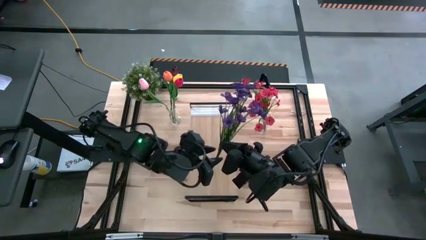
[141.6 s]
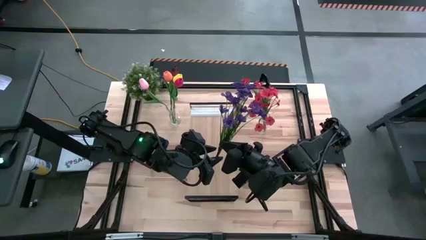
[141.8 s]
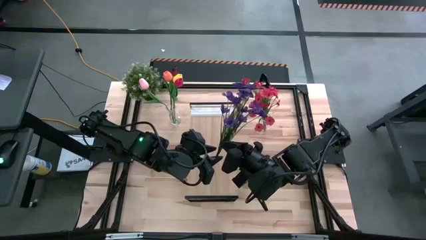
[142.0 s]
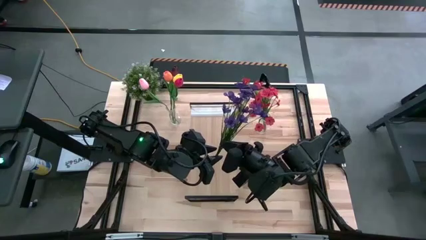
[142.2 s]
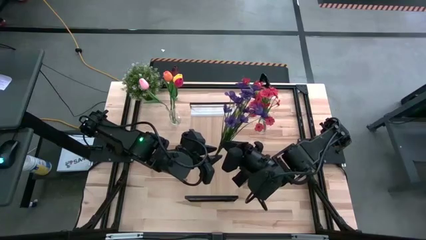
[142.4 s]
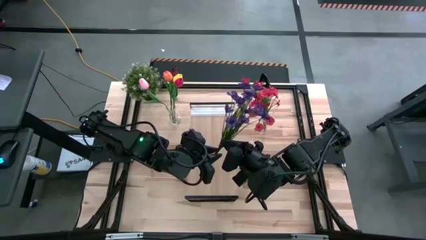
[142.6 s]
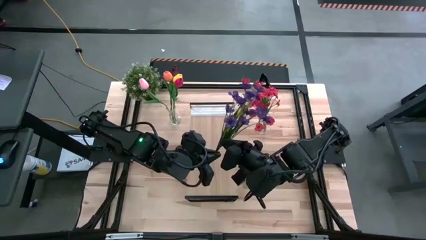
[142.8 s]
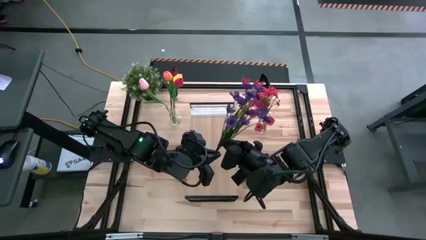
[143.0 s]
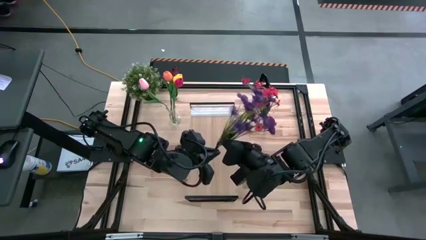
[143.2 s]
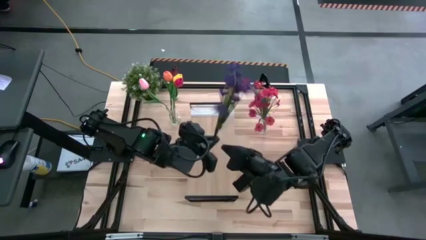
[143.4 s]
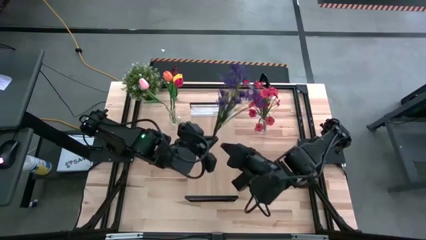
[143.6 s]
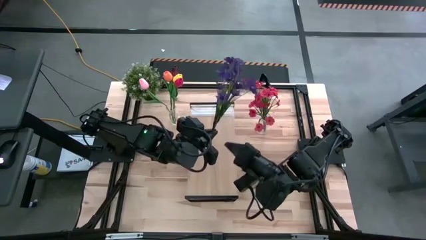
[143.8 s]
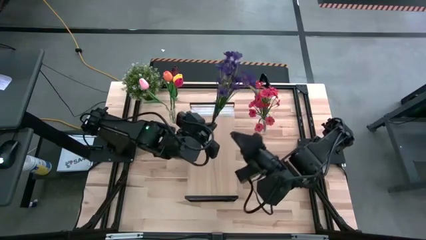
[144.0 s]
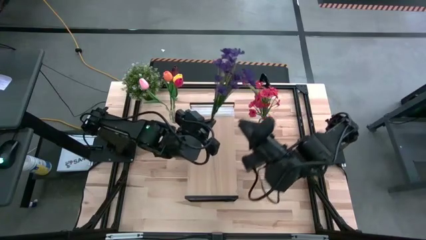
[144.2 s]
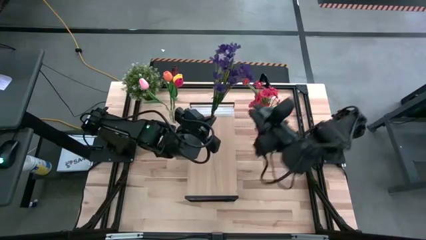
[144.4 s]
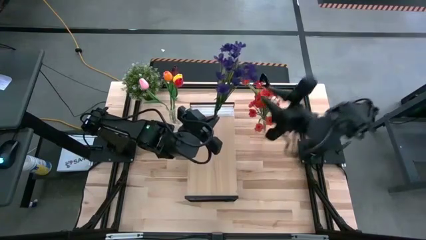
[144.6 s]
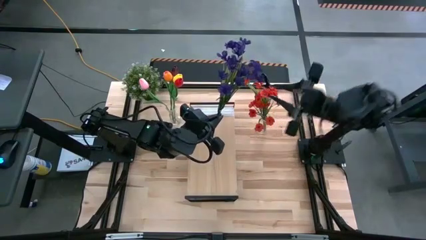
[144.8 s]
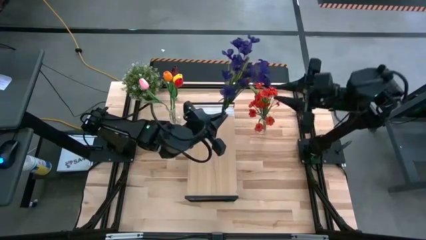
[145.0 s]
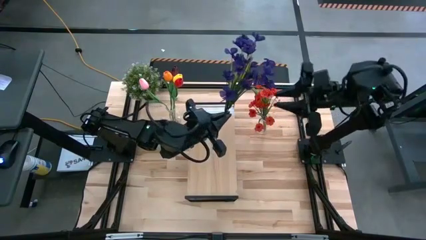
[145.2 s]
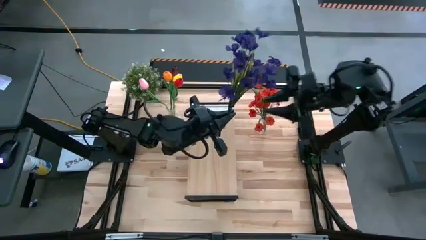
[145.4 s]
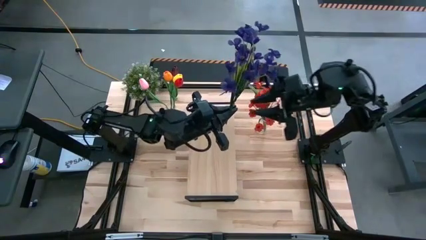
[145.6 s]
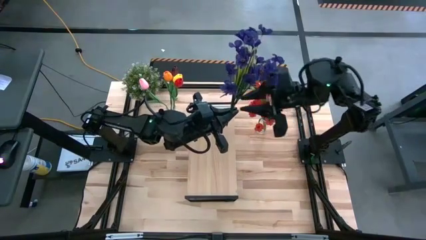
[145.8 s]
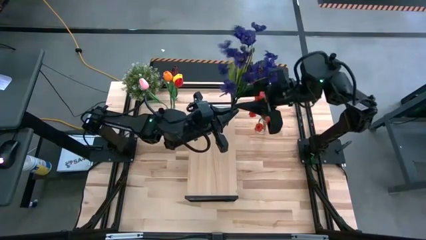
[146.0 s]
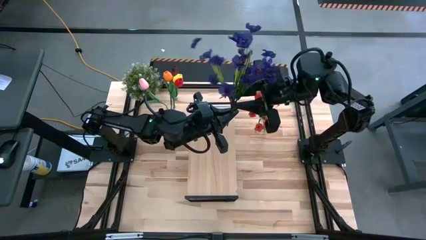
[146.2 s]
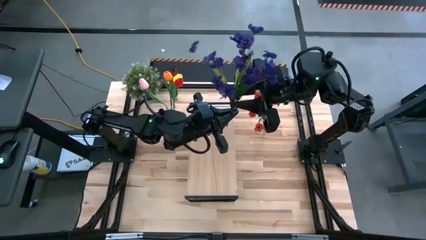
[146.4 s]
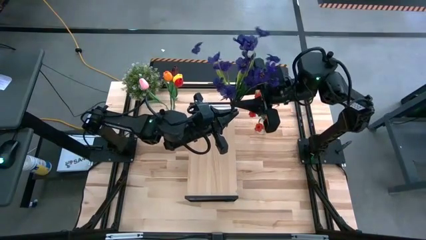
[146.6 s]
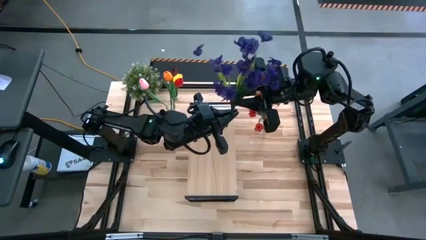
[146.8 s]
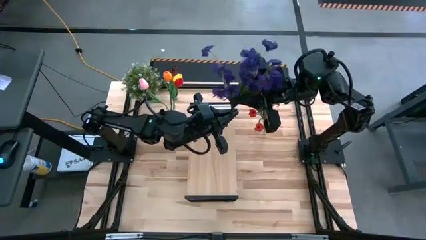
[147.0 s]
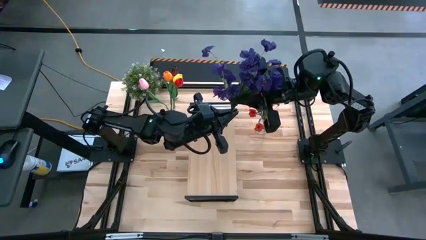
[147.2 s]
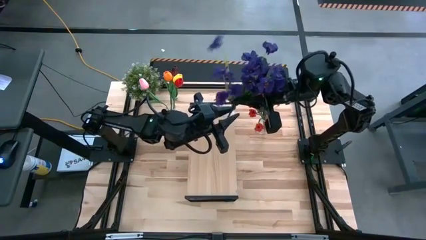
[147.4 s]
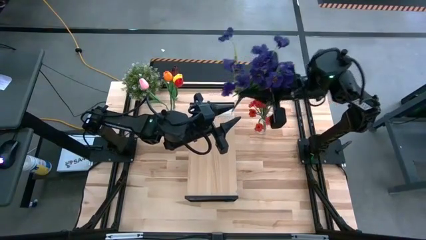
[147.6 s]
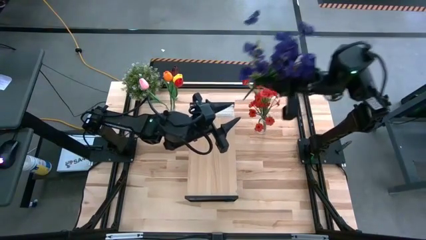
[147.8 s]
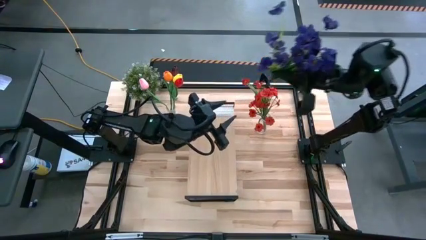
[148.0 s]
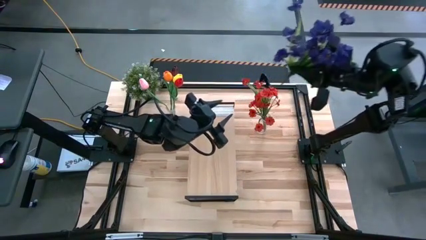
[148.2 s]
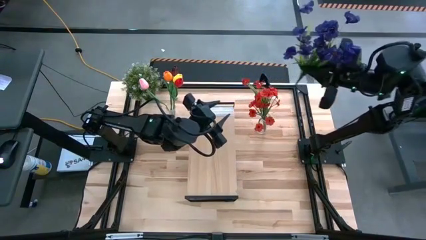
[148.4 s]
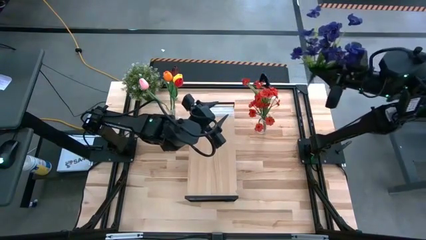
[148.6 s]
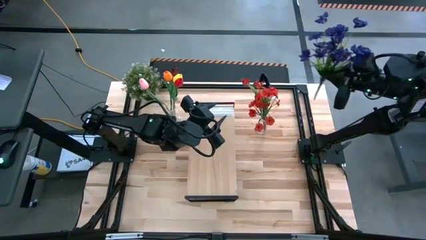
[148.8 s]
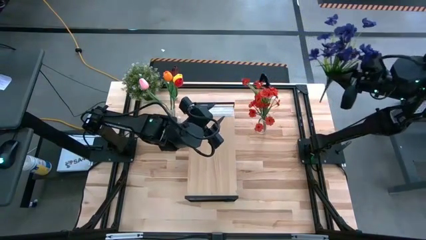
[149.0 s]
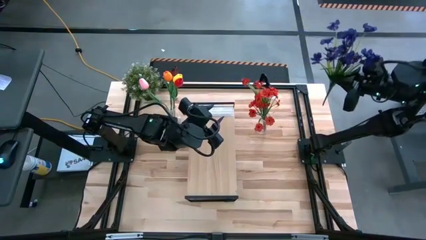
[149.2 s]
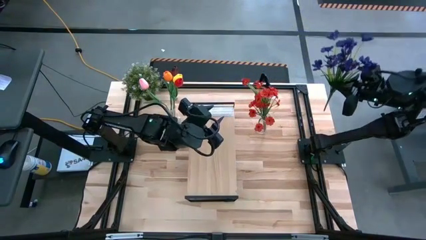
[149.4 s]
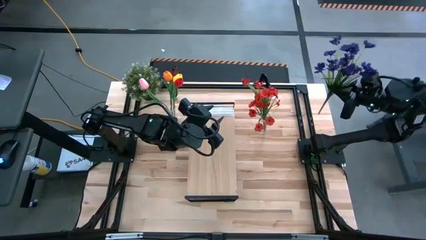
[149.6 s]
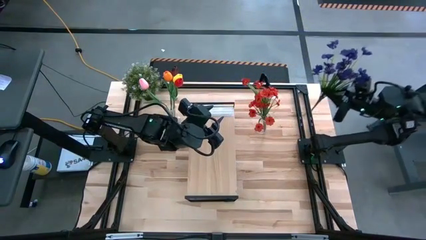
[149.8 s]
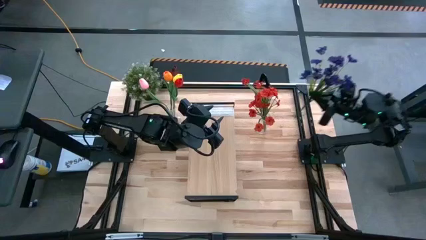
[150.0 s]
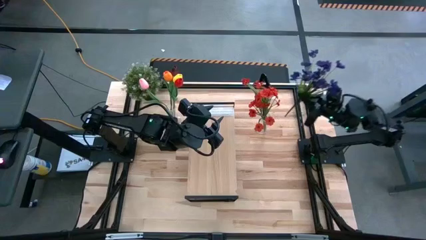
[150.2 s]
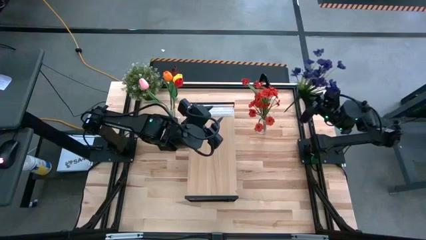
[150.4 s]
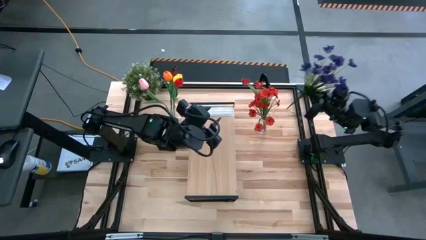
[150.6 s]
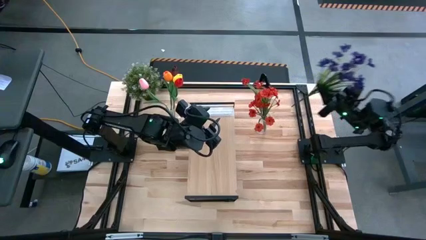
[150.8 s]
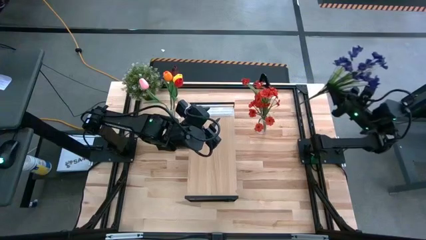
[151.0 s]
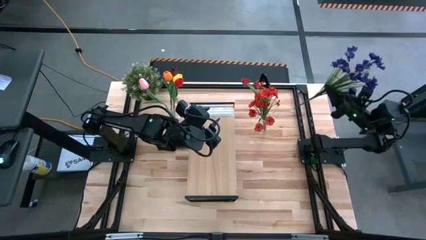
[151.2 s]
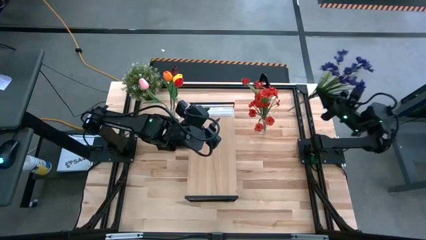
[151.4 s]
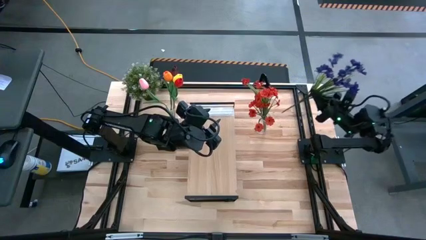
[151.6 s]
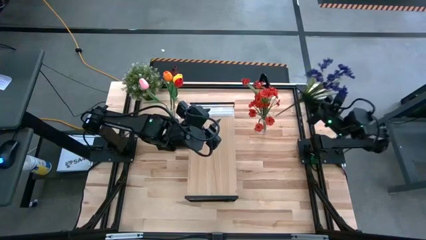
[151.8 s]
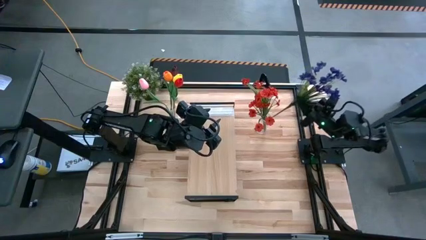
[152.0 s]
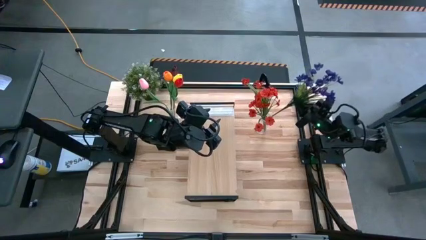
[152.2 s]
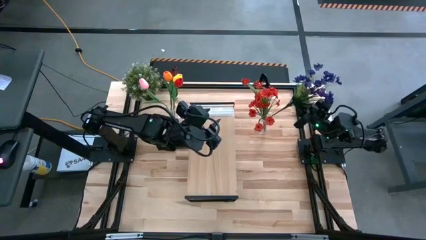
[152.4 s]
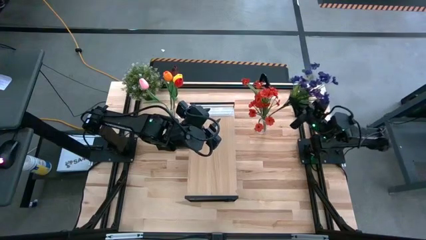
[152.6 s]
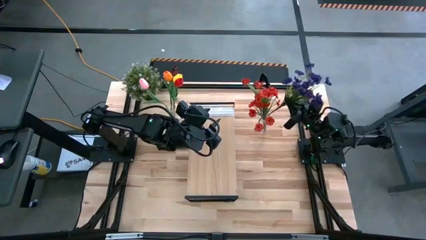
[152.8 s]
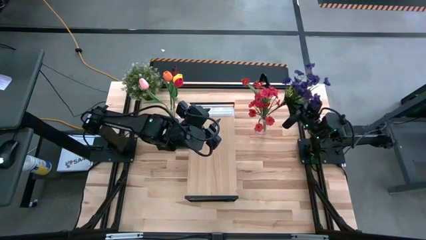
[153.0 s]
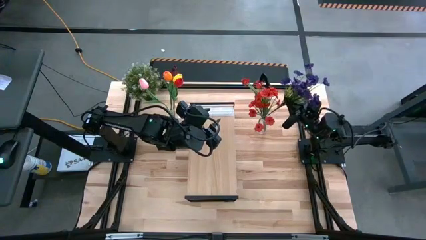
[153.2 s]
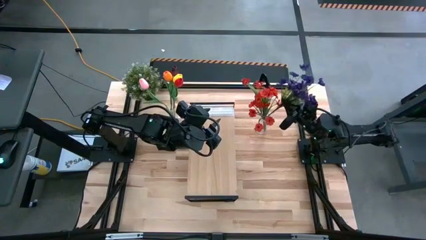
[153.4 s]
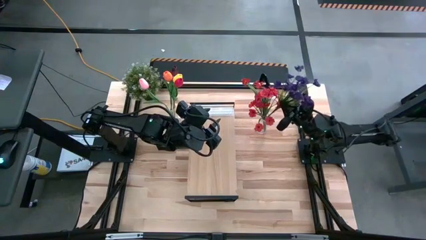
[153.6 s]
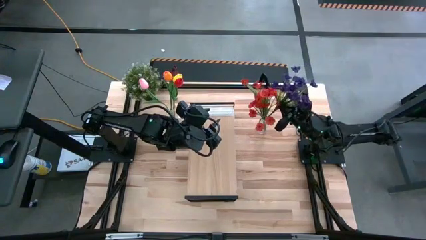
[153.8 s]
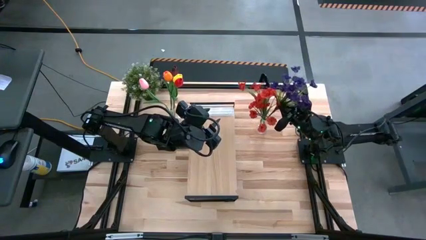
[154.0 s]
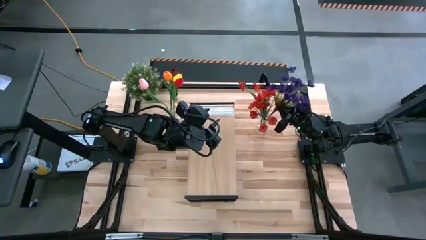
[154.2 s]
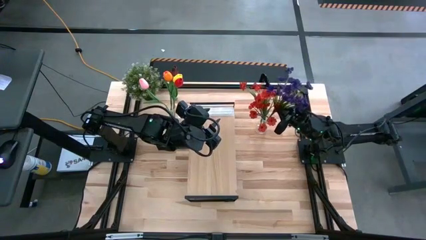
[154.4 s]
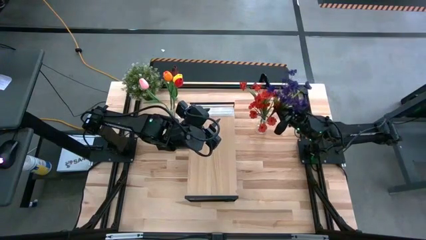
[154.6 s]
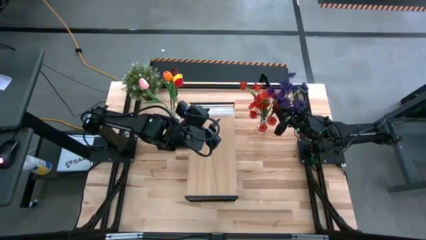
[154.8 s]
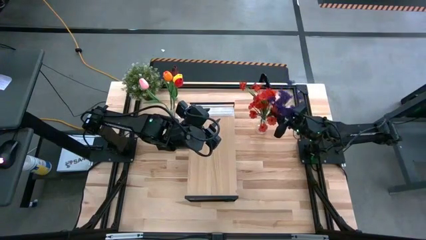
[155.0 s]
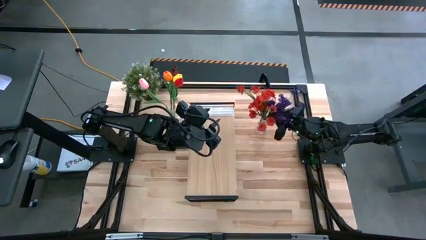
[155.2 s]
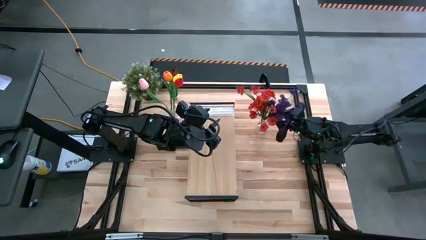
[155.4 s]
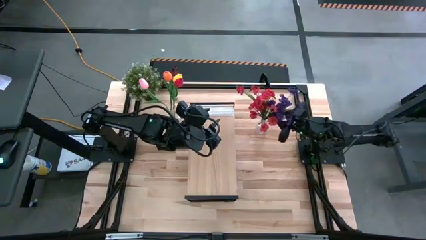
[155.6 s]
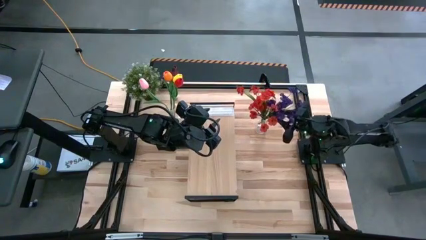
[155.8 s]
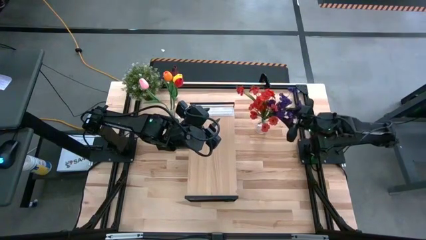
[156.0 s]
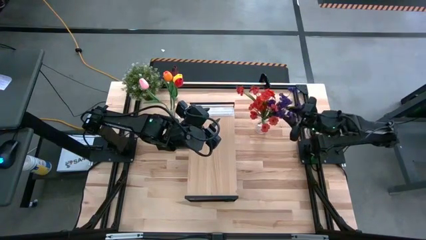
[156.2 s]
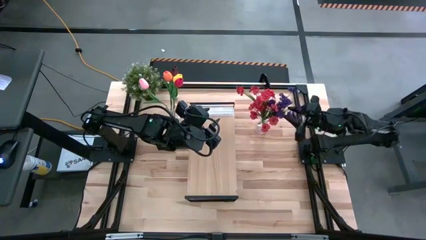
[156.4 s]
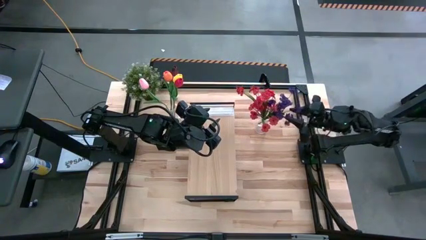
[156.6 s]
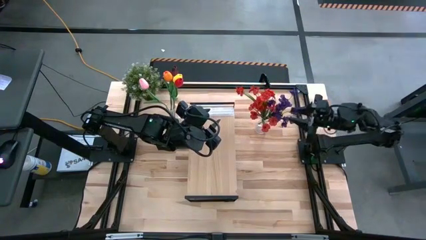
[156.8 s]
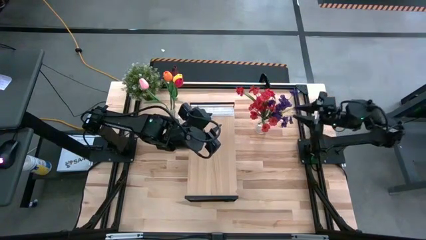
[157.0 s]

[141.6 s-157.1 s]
Task: Pick and place flowers into a vace then onto a shelf
Put the purple flowers into the right transparent vase

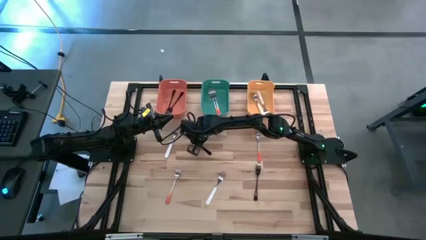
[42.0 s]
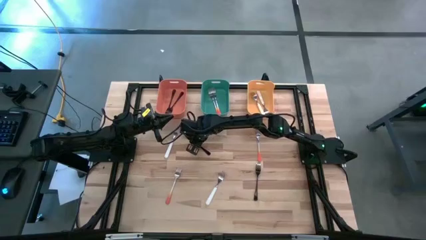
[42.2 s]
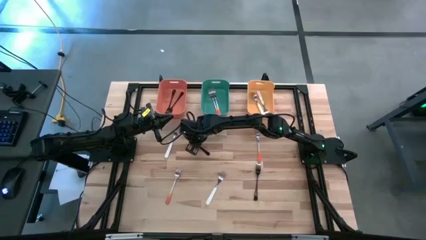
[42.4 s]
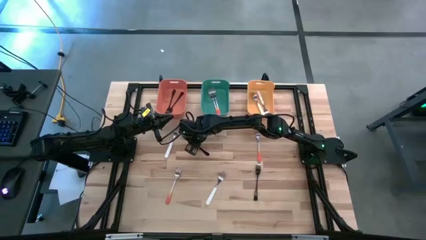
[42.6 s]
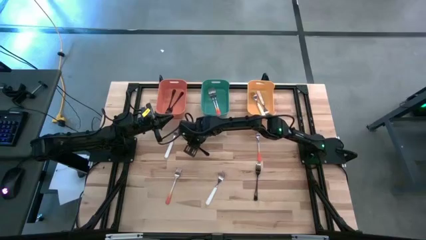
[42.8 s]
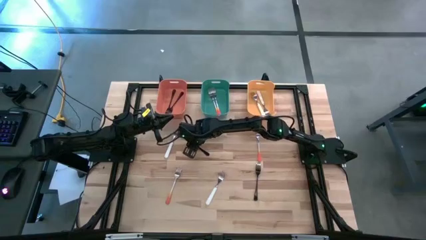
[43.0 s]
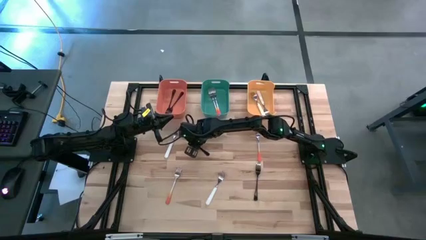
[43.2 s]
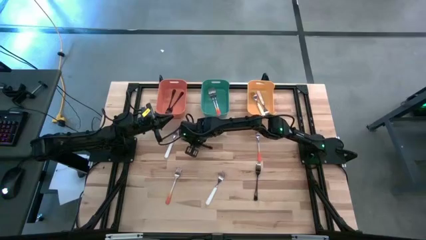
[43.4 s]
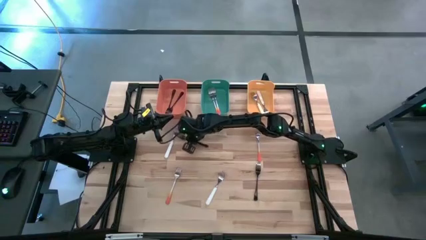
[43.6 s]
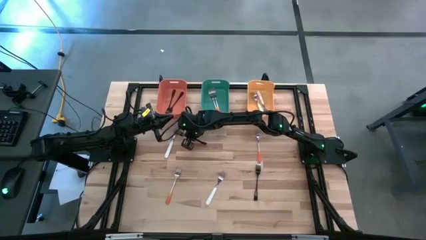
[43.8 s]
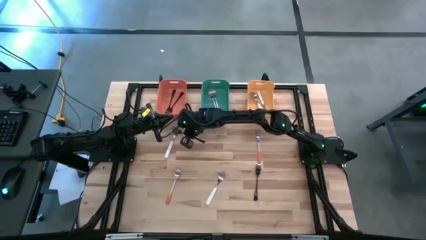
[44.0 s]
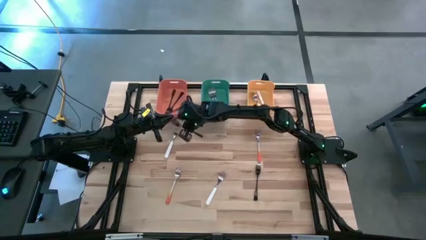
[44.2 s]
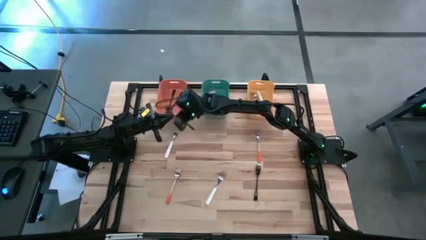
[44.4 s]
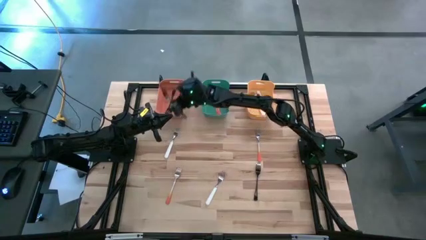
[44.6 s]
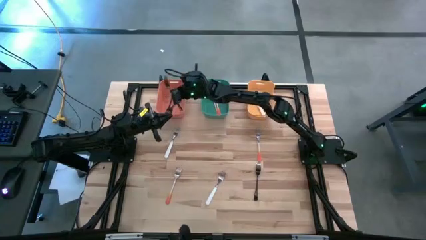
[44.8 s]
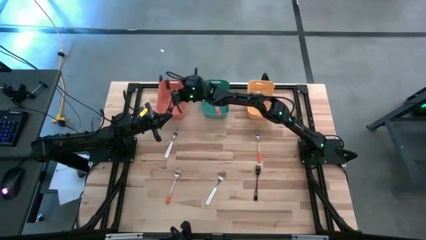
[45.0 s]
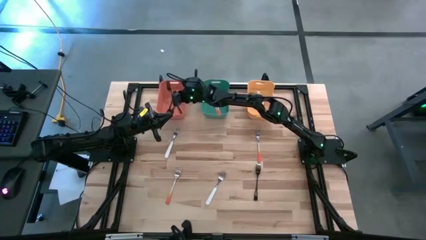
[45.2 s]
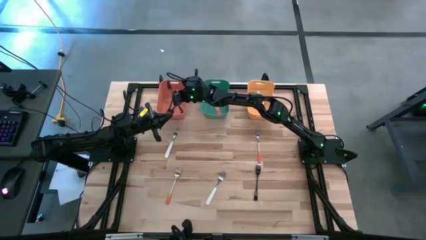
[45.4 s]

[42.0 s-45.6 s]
Task: Sort silverware by color (type)
Put the top black fork into the orange bin
